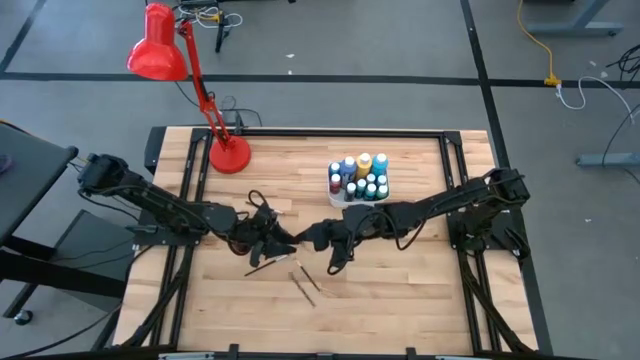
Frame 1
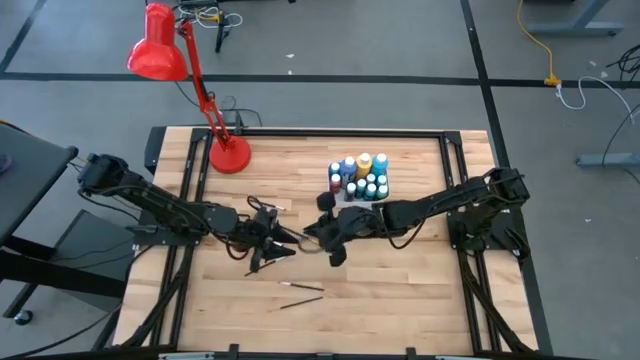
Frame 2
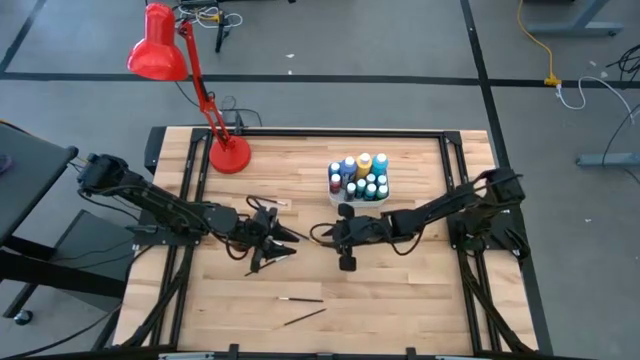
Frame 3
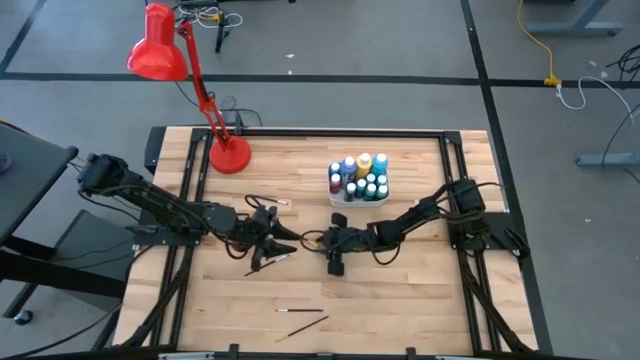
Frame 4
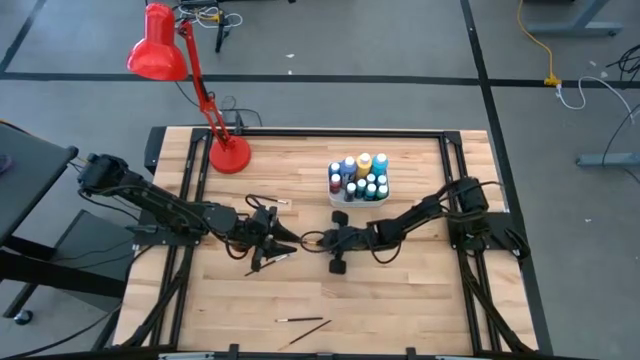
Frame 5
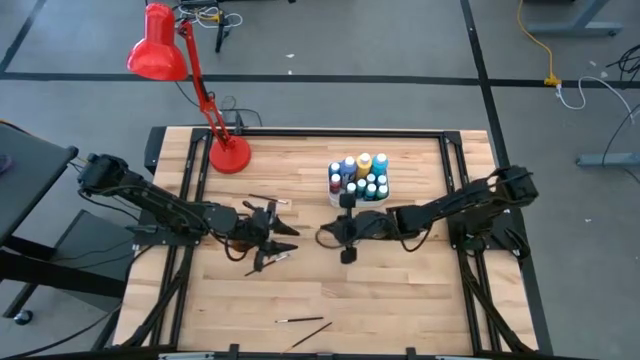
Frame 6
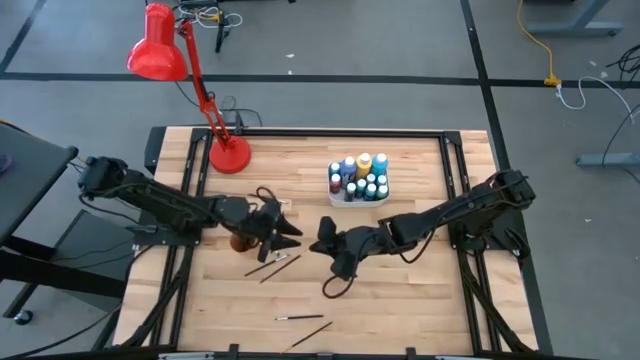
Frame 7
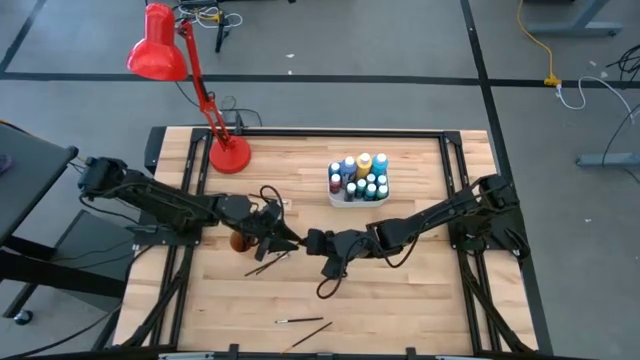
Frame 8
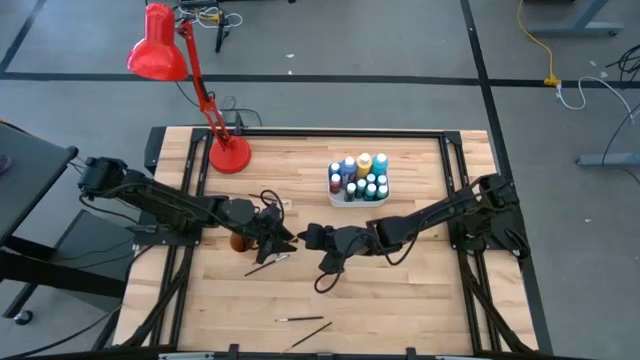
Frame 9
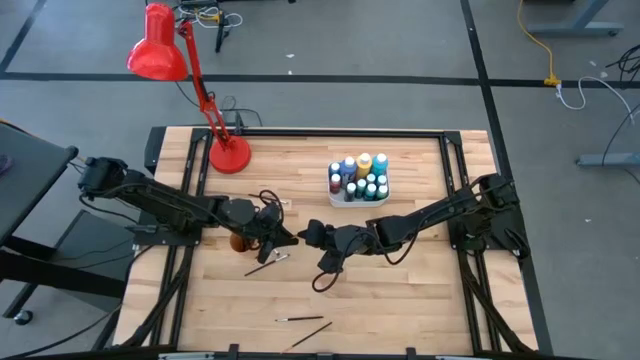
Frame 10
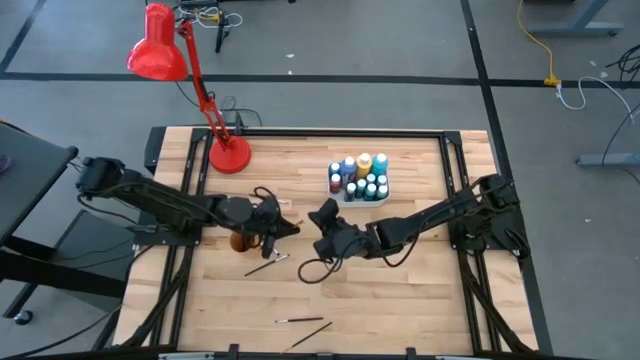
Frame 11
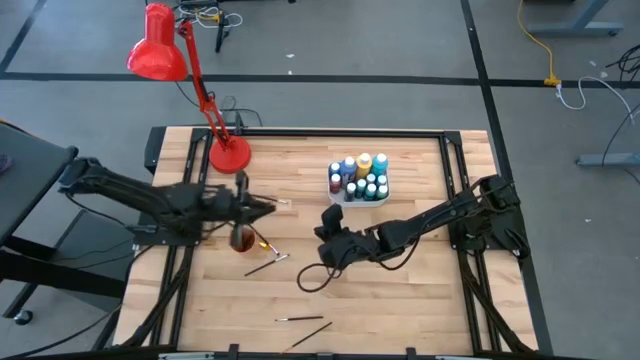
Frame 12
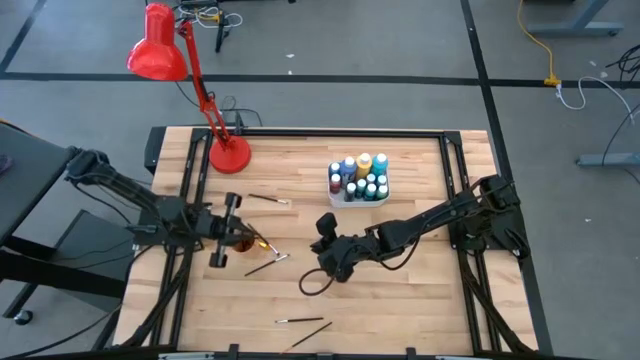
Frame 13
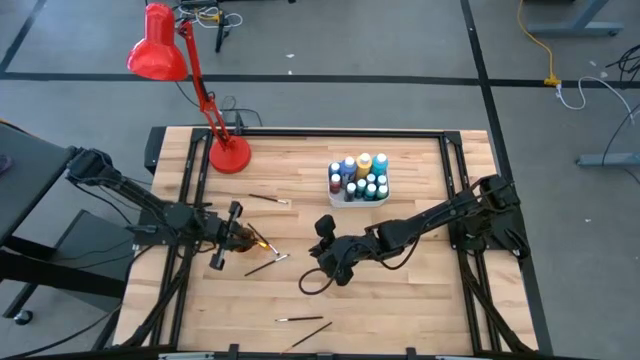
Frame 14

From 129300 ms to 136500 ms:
Task: Pick & Place Paint Supplies
Put the gold paint brush into the orange cup

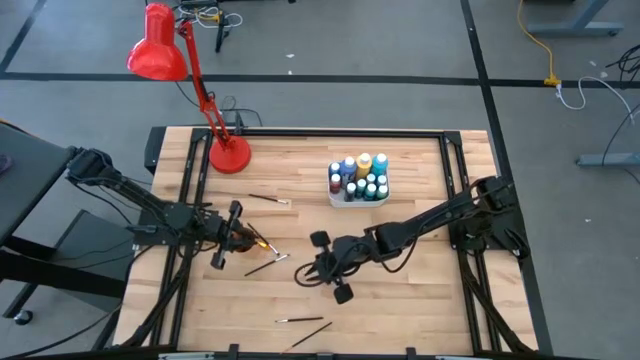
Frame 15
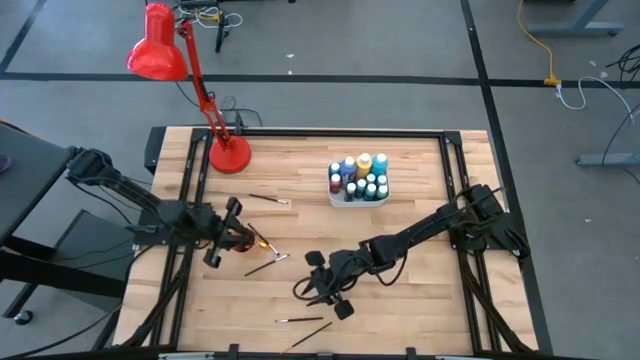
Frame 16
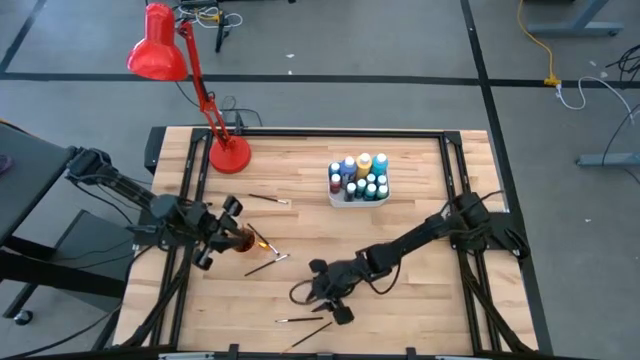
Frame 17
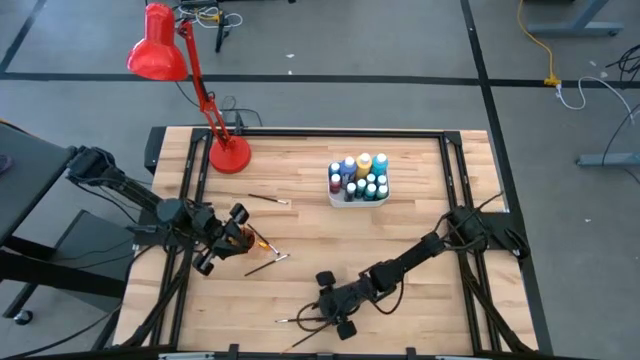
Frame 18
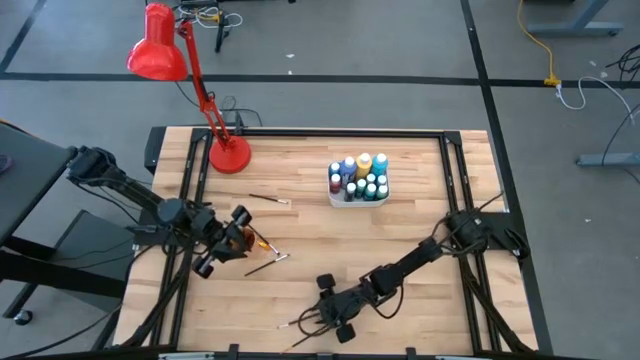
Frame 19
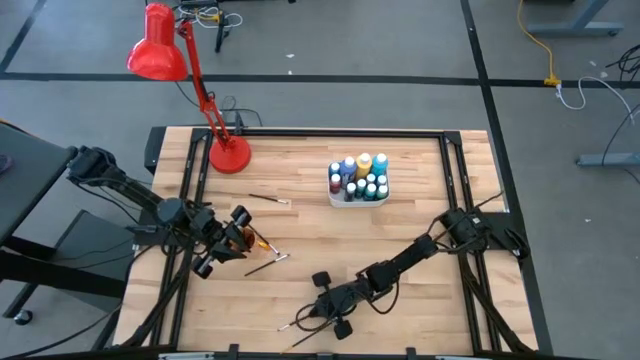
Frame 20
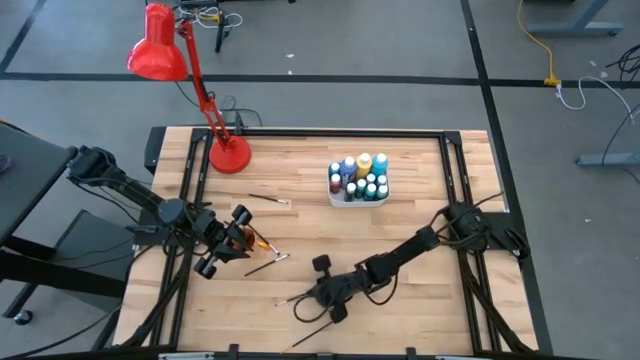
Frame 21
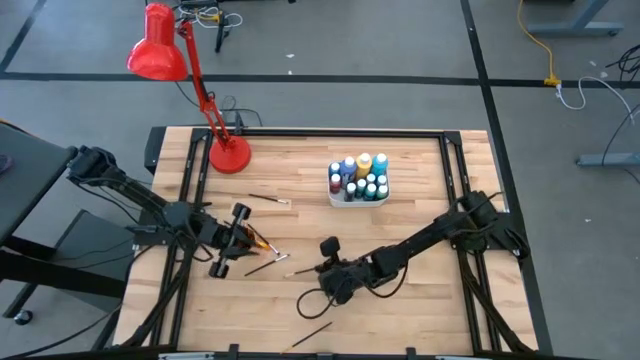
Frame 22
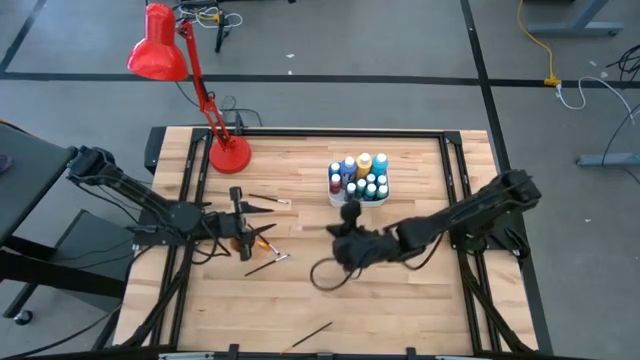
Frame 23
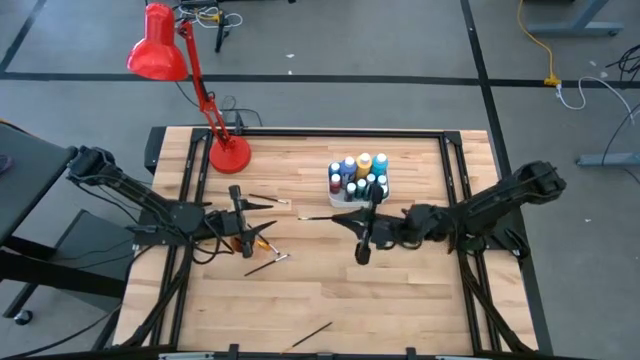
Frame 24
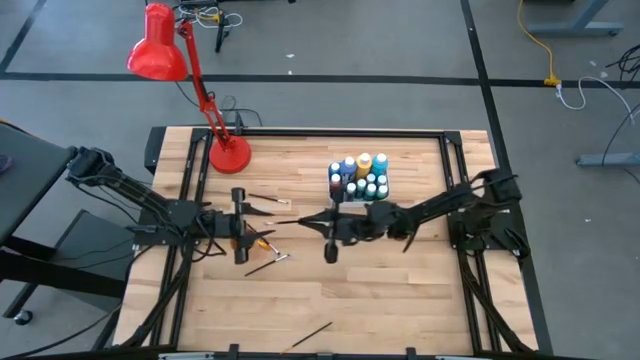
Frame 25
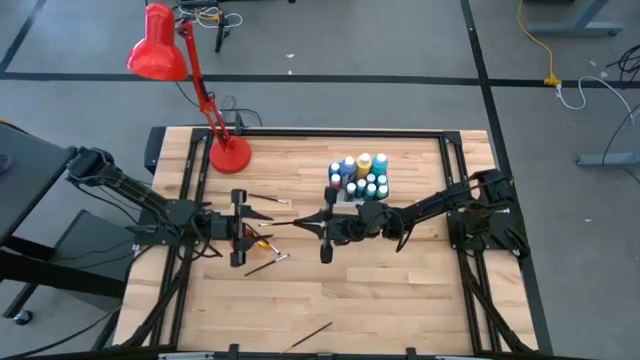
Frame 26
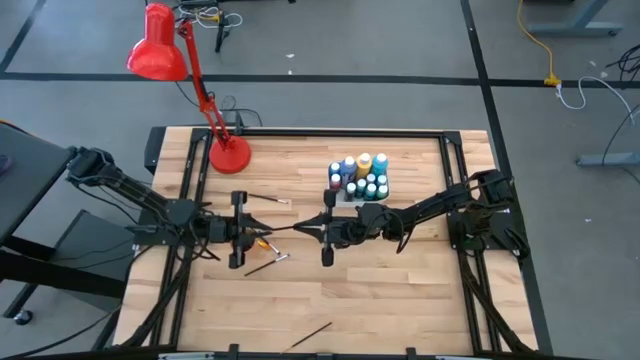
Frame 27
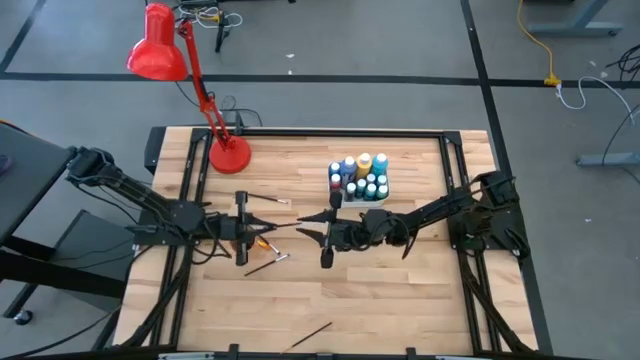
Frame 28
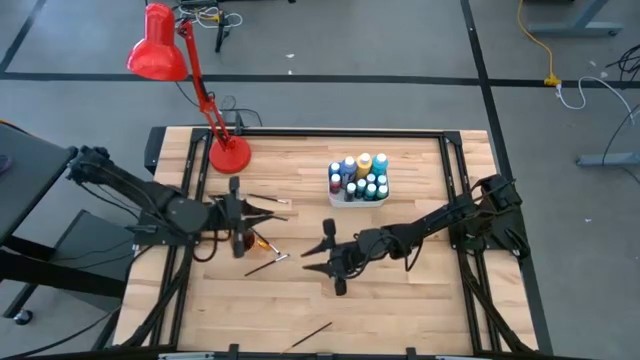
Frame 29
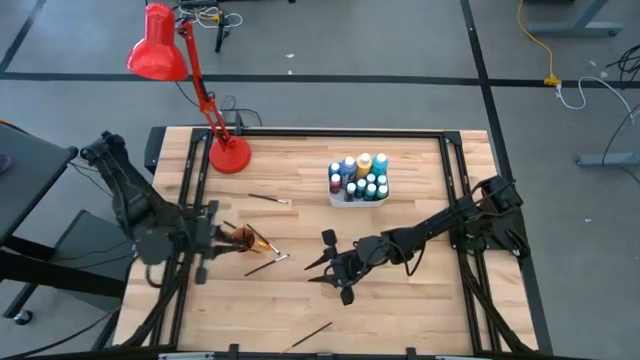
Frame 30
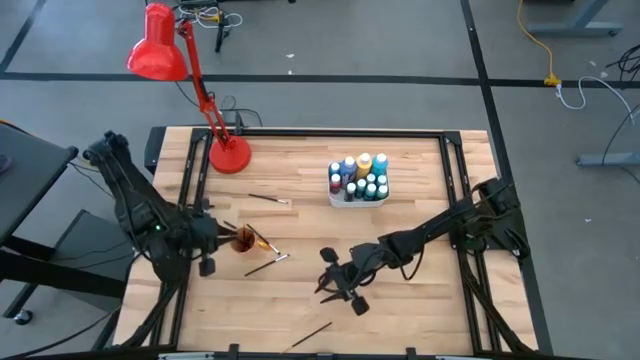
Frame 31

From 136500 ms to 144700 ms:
Put the silver paint brush into the orange cup

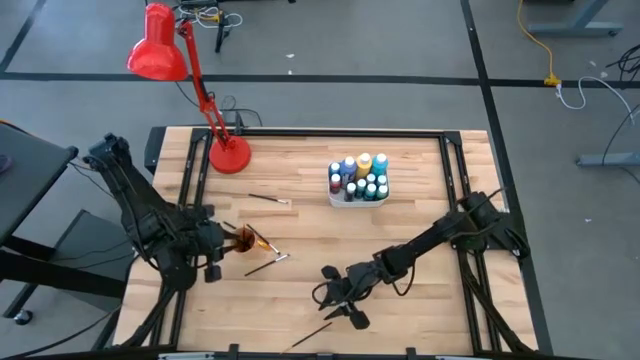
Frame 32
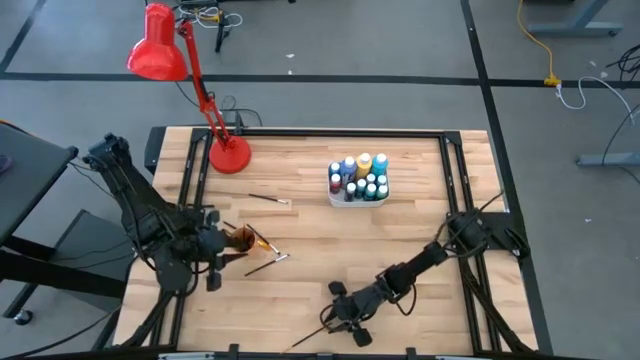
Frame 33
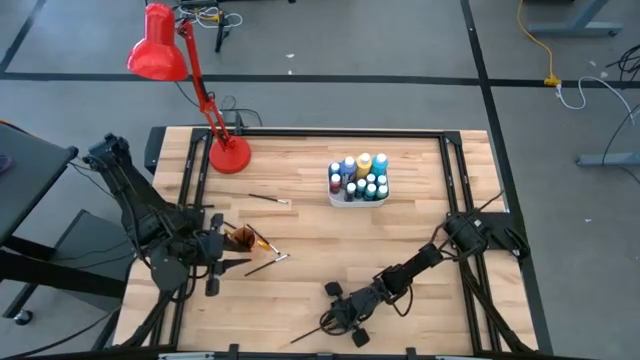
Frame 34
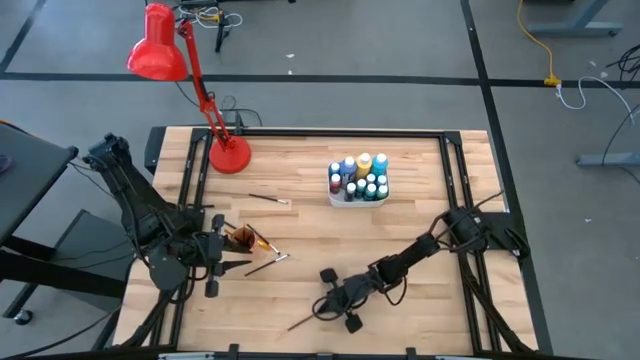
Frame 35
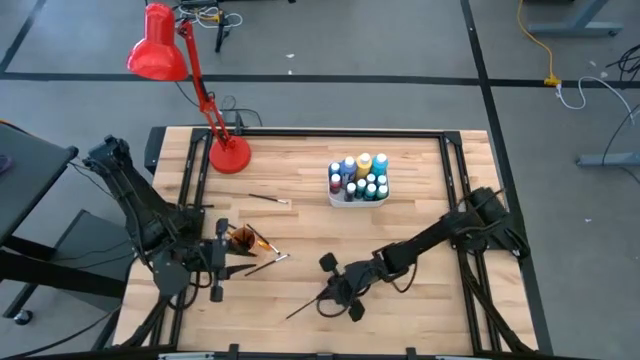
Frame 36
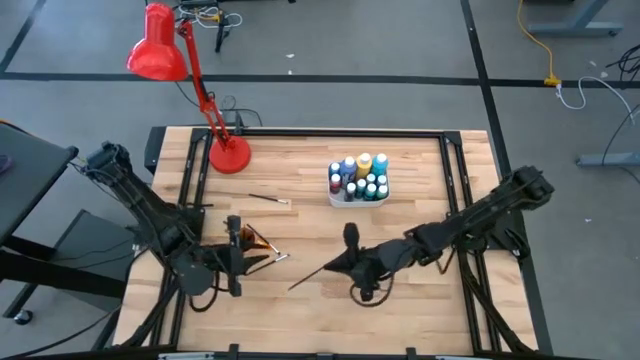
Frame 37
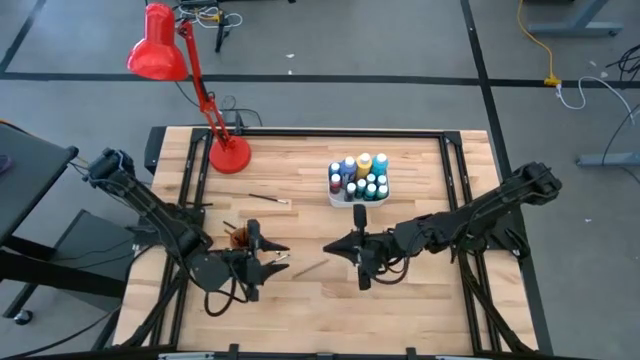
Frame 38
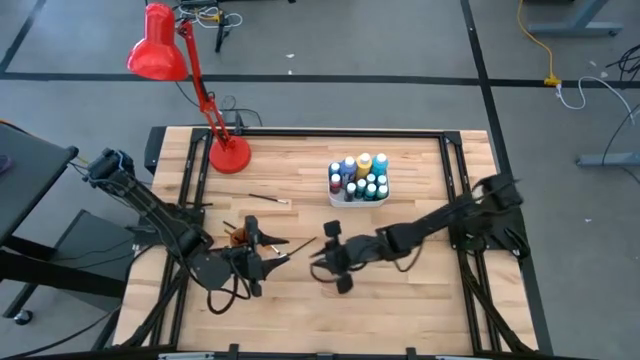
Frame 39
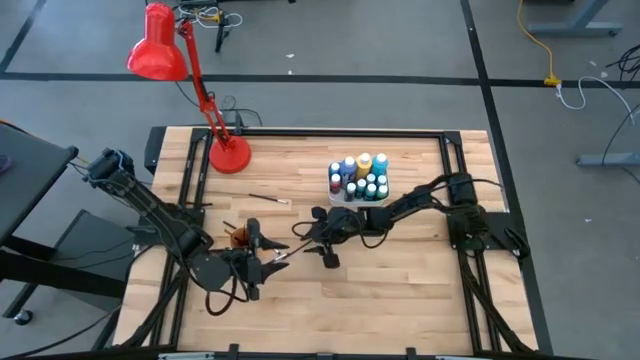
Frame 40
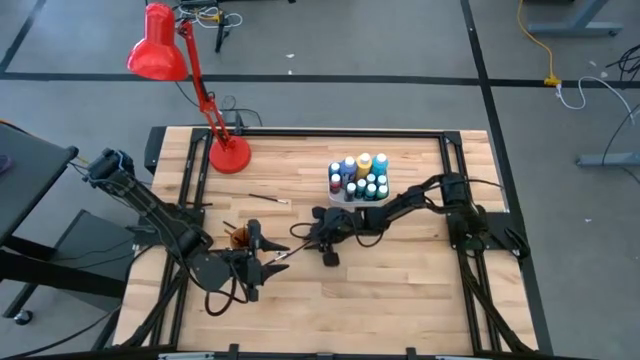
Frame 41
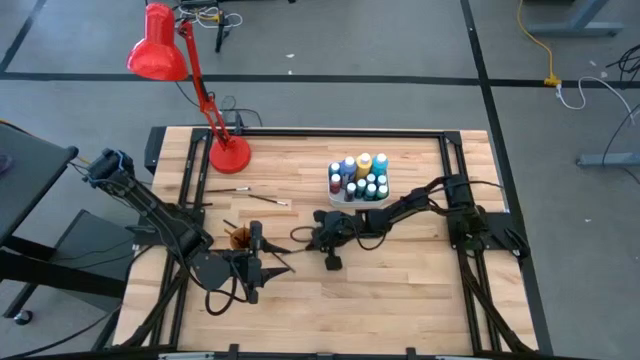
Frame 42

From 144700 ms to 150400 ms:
Put the gold paint brush into the orange cup
